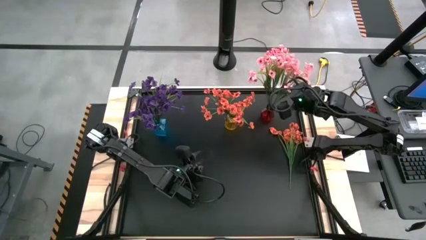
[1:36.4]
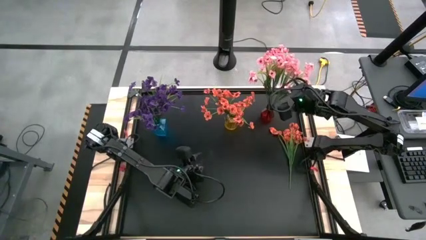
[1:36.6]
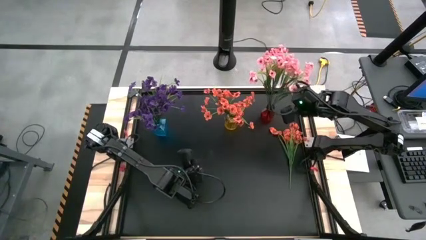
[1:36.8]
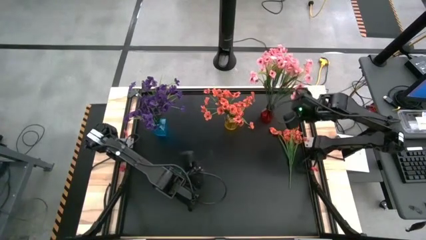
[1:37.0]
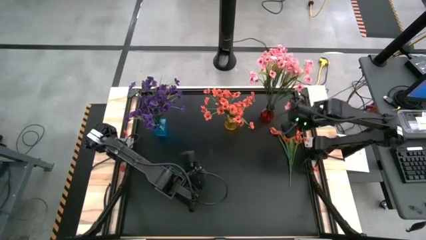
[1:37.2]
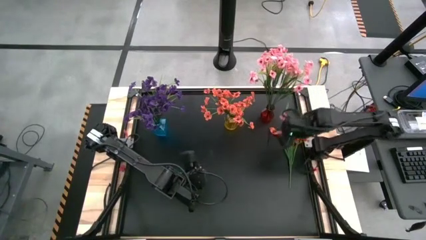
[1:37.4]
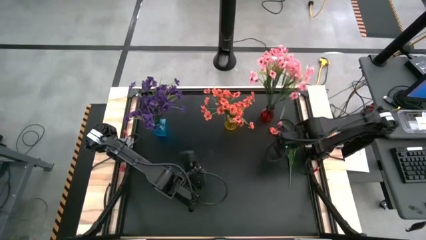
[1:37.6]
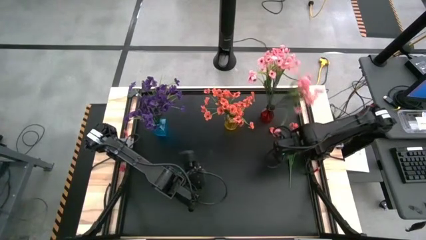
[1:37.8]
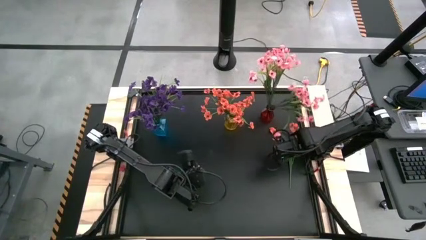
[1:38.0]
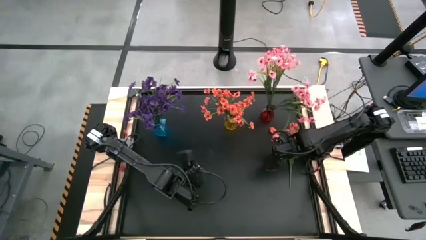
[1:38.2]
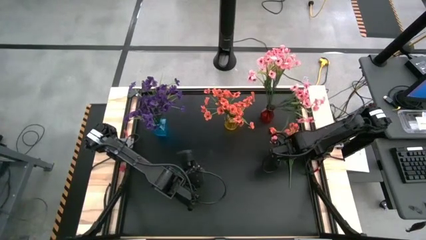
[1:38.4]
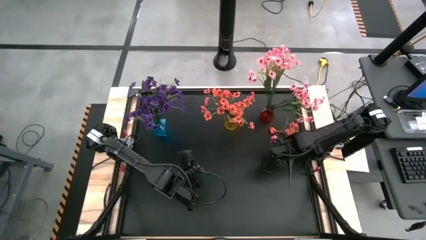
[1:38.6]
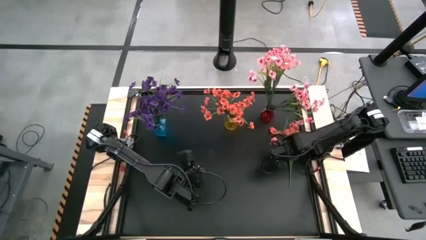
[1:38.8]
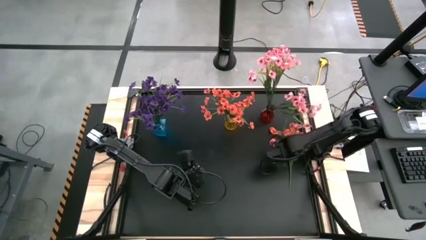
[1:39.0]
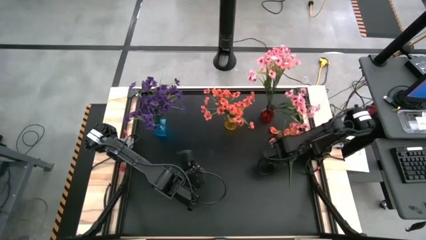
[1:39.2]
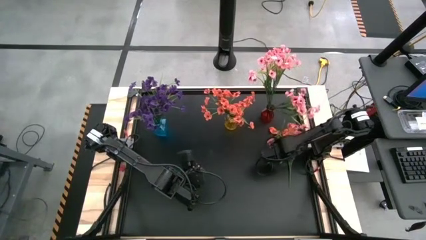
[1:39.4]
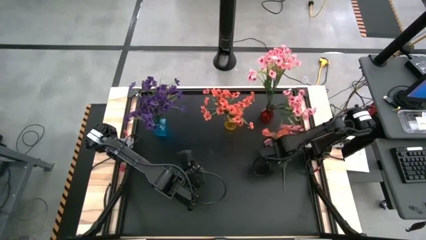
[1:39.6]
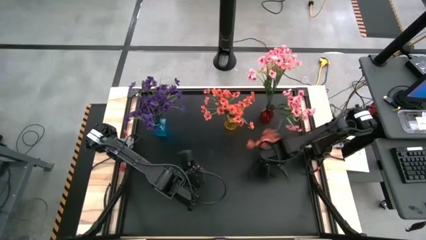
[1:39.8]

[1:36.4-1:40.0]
Task: Sort flowers into vase by color
Put the orange flowers into the yellow flower vase

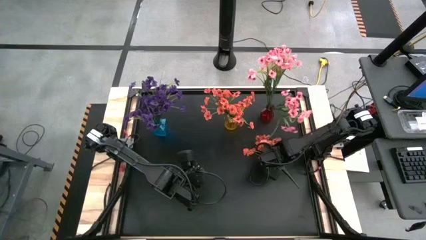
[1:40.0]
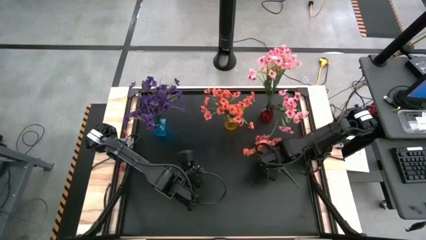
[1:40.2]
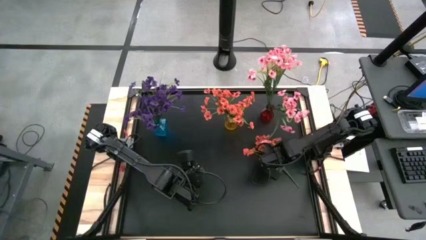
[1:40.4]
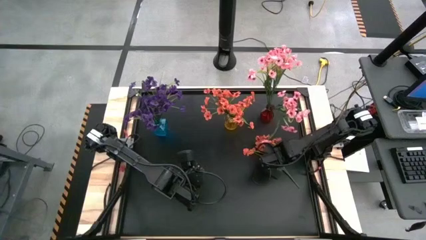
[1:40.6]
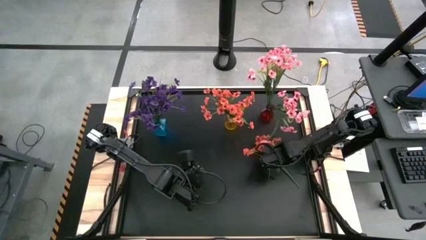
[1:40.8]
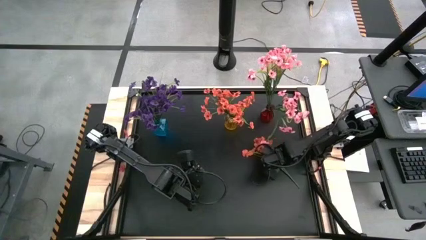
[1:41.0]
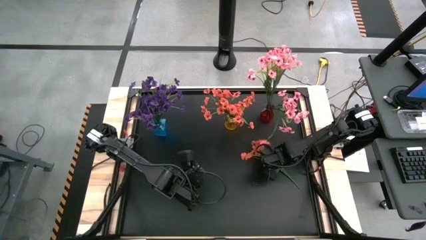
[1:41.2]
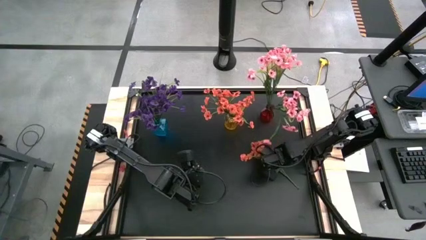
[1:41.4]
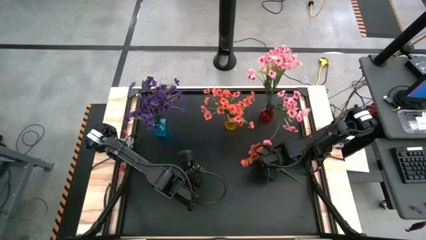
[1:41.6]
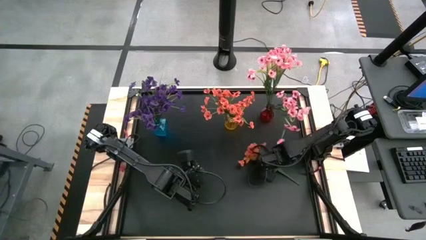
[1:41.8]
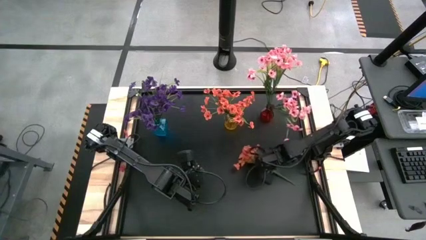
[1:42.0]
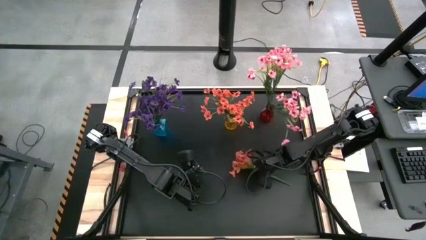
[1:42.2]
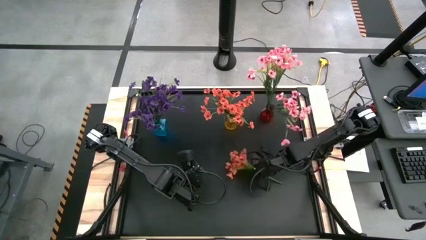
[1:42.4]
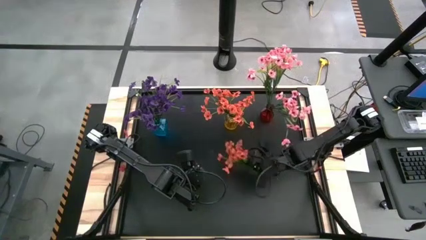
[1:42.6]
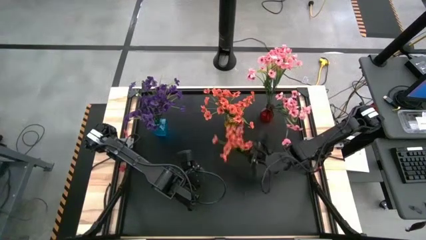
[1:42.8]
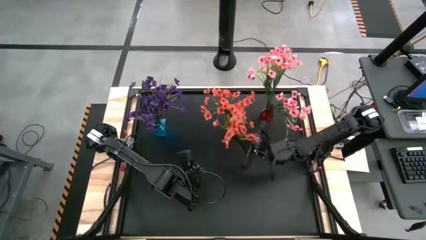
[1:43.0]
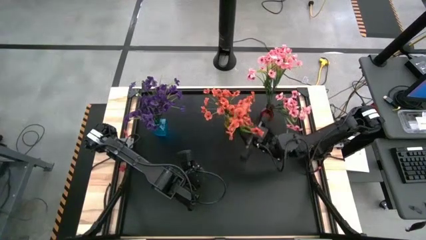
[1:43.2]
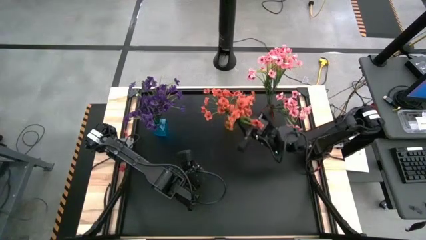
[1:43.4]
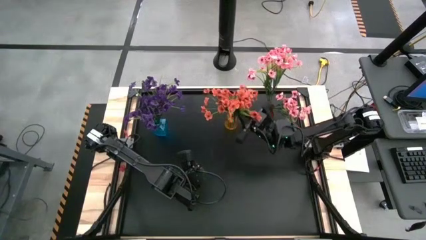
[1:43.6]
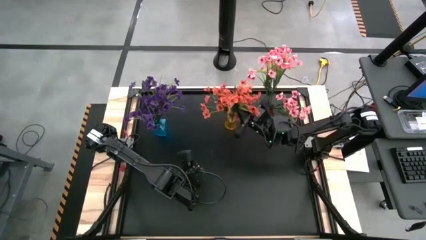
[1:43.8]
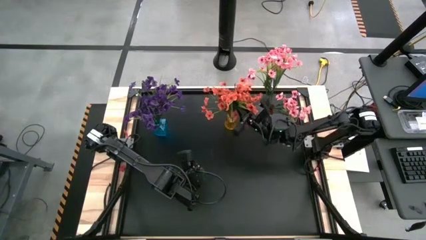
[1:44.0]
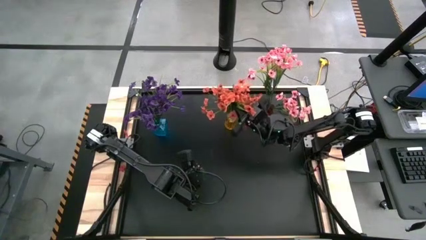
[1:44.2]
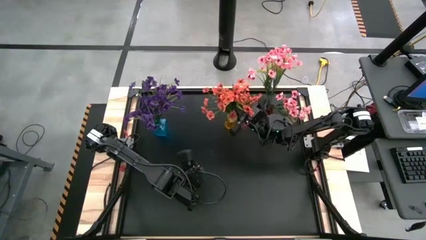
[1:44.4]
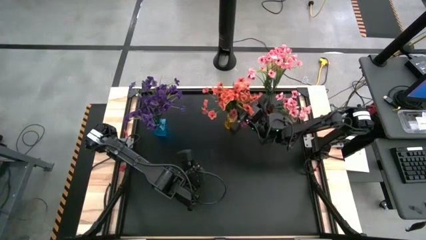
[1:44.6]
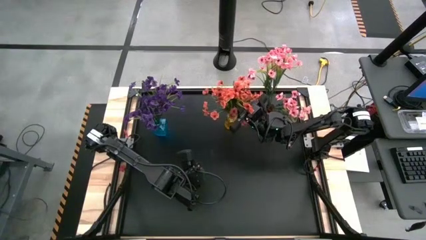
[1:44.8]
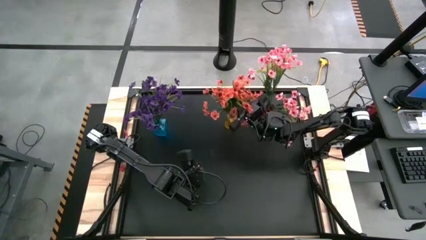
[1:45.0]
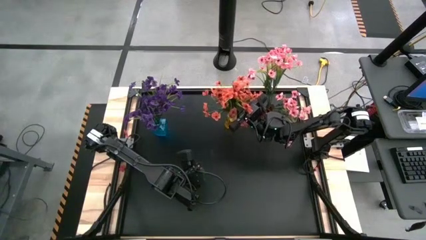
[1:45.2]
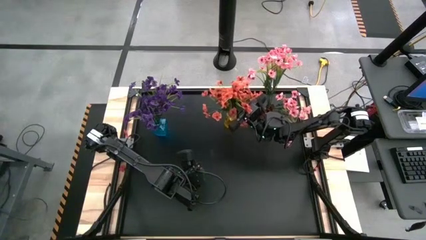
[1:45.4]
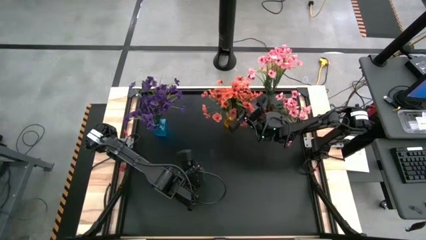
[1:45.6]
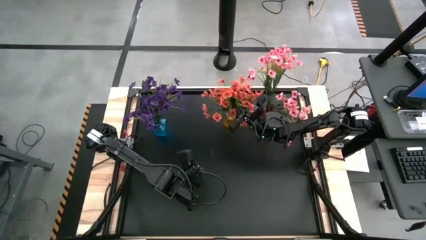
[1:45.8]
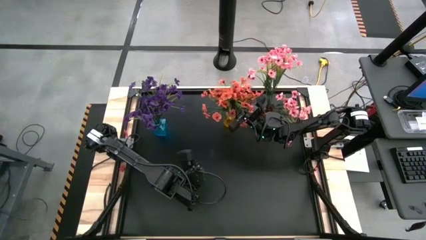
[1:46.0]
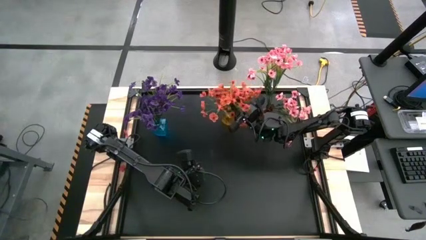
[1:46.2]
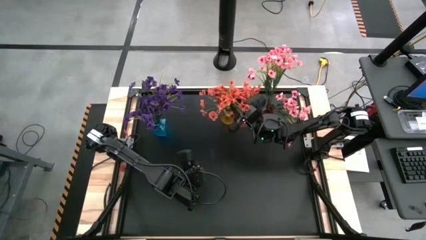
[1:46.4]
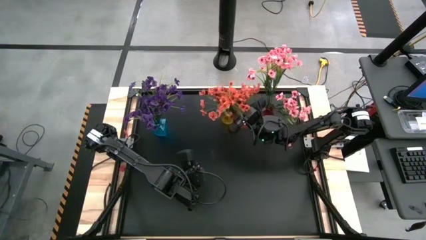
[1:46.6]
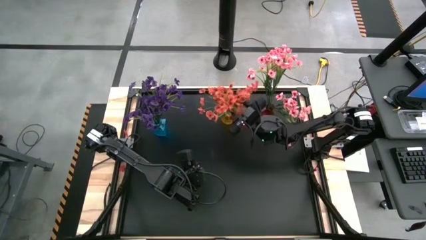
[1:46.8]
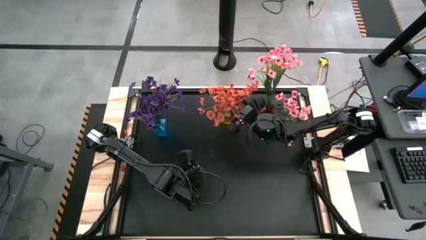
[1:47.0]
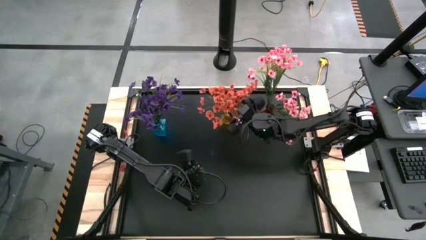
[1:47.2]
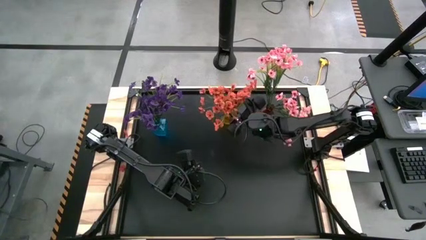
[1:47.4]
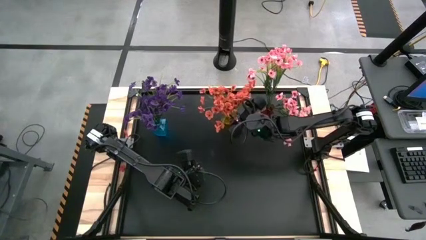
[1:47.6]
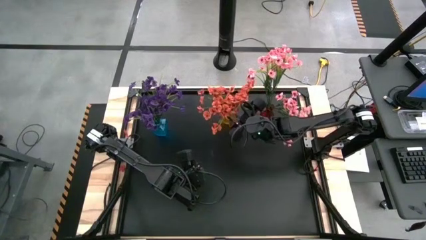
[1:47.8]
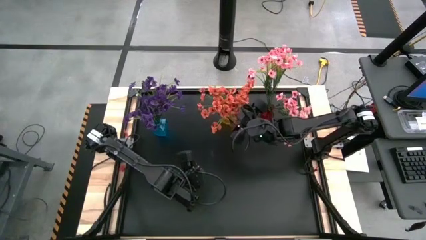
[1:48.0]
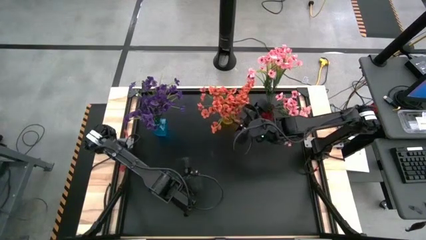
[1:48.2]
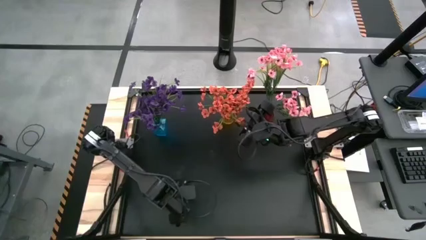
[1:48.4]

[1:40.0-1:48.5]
Put the orange flowers into the yellow flower vase

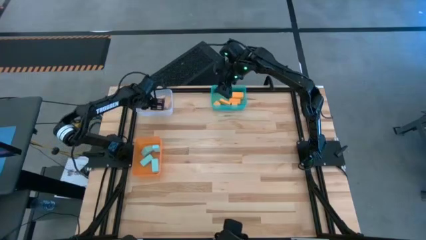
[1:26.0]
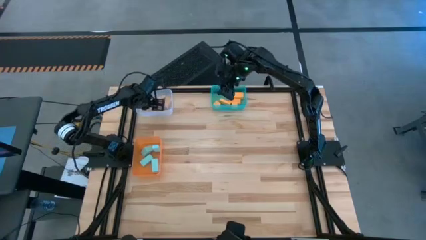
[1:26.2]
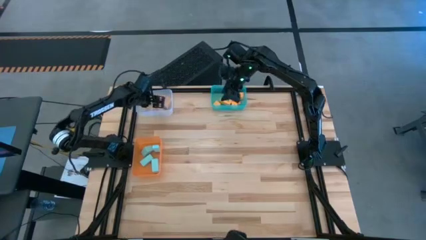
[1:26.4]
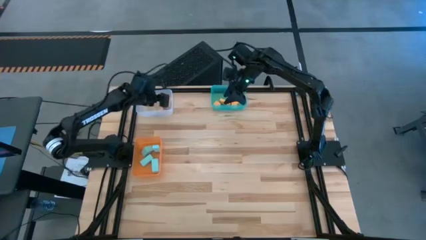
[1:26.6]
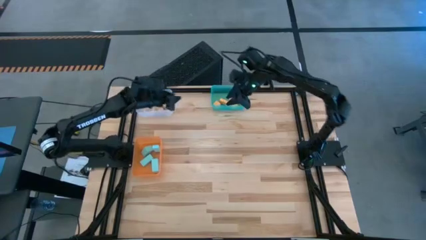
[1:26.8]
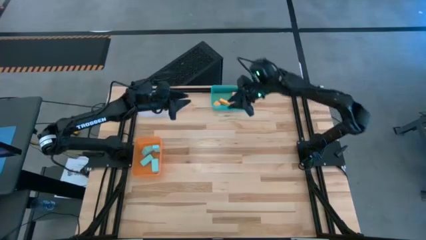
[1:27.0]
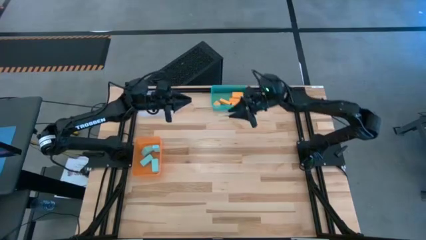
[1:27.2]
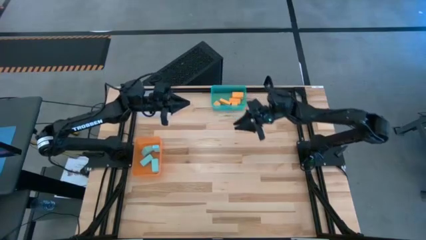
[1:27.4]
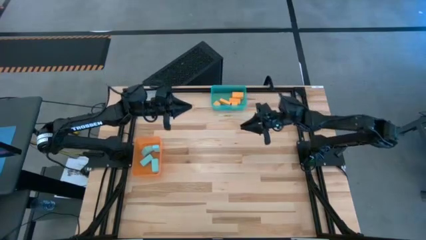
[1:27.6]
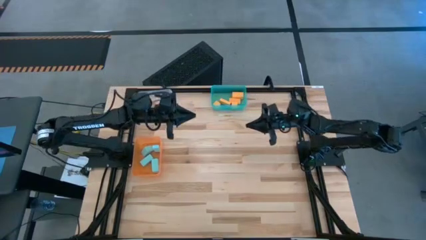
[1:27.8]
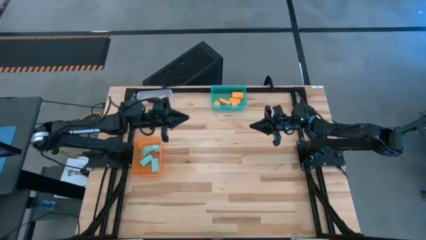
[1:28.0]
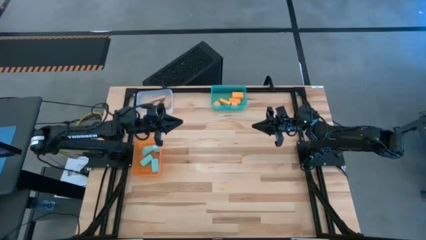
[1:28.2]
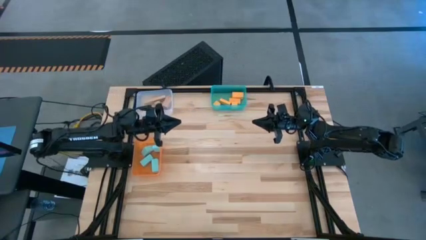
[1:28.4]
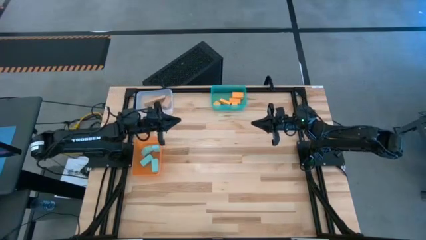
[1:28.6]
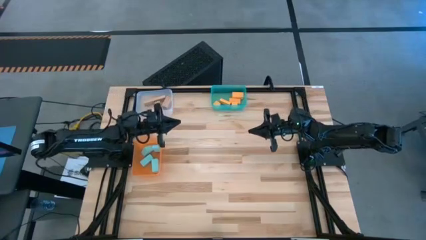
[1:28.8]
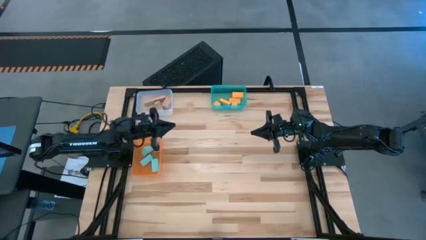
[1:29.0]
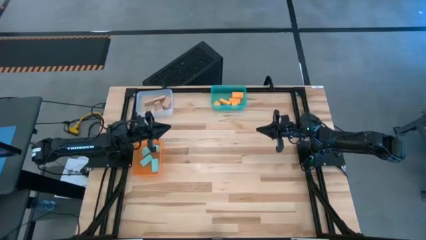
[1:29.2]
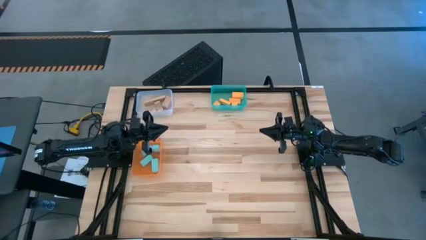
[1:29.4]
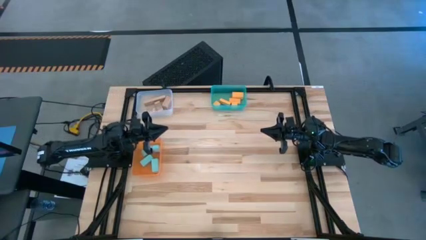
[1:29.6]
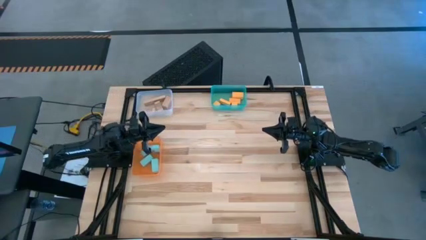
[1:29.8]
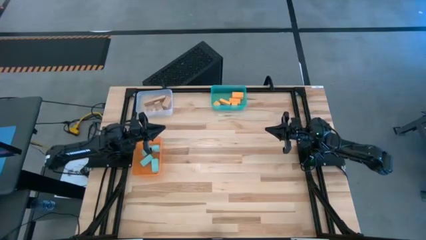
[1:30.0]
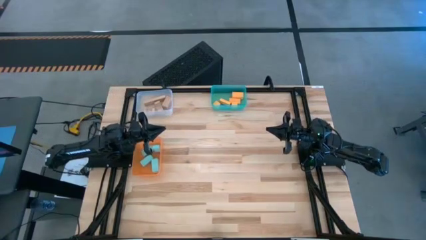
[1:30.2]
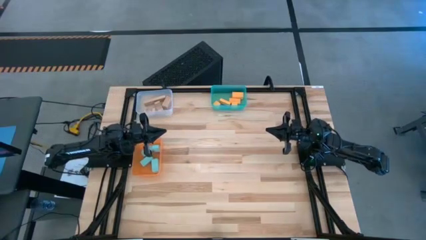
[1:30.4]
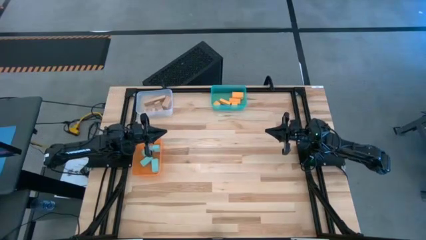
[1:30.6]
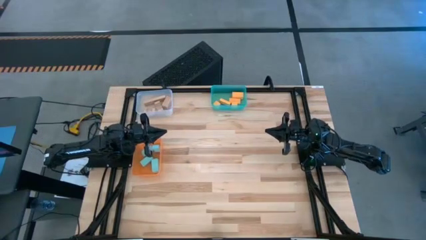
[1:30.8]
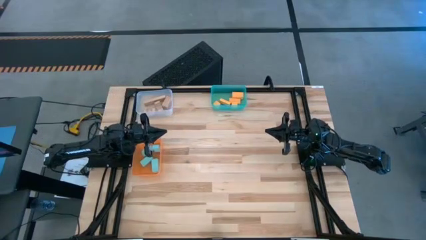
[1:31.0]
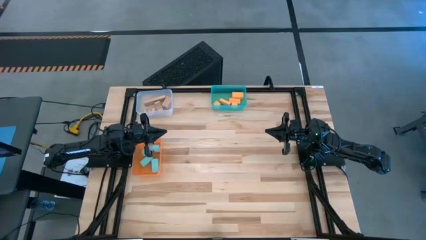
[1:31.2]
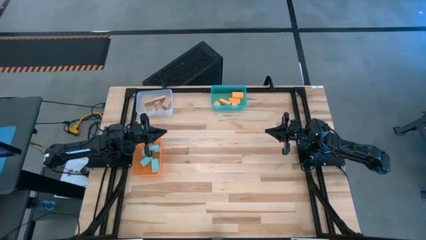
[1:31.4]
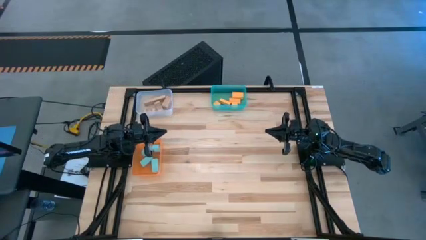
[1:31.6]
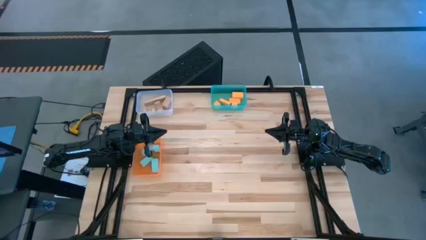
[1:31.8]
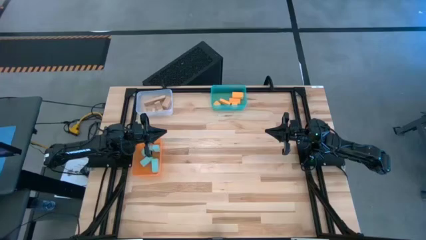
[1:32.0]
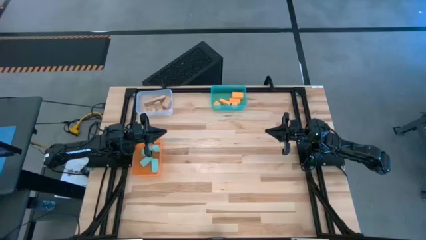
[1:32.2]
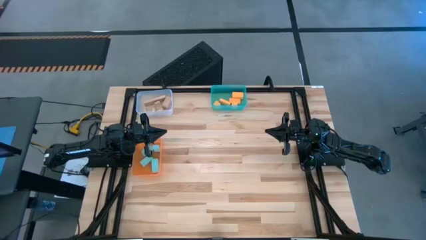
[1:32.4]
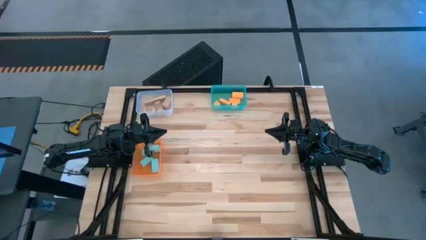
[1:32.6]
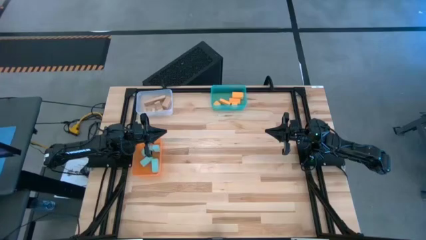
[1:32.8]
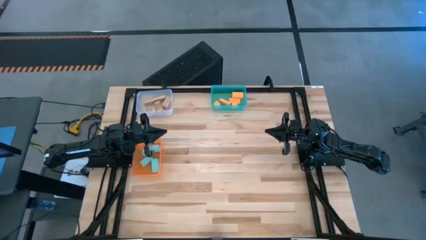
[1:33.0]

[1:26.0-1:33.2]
Task: Sort & place blocks by color
Return to Home Position
